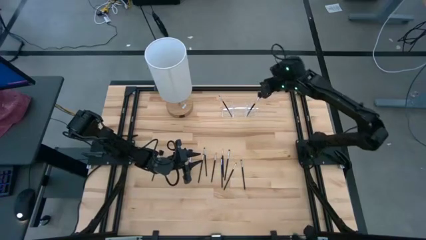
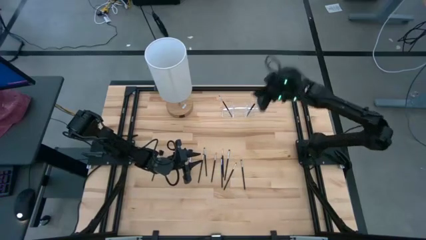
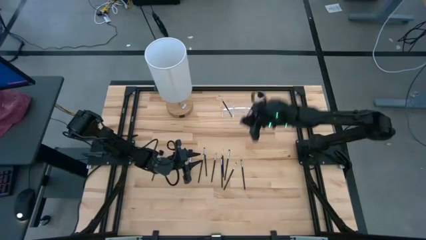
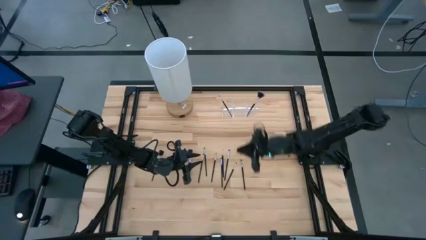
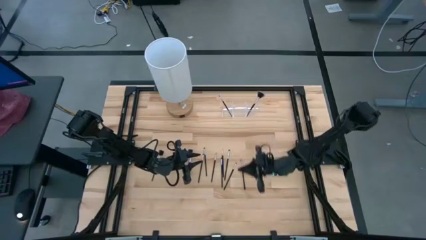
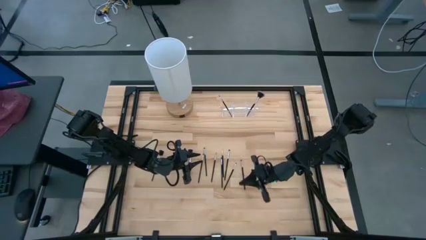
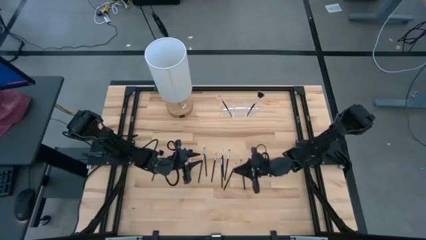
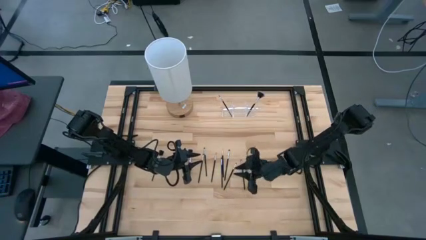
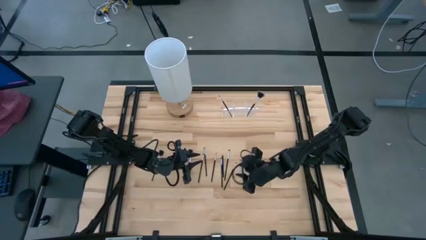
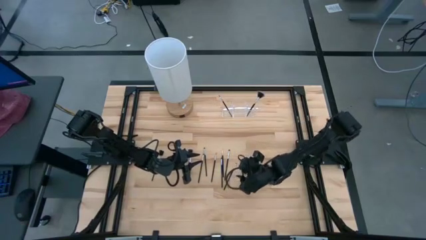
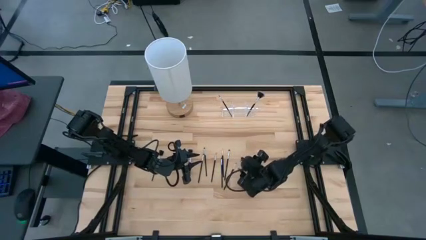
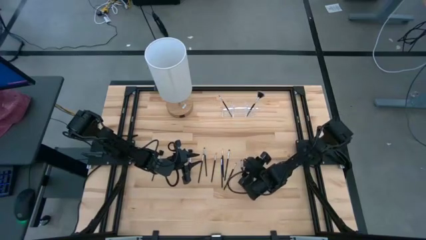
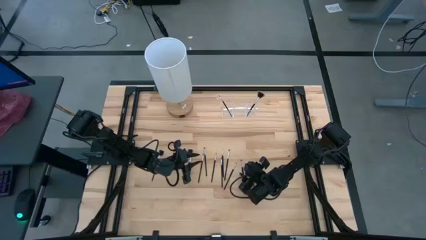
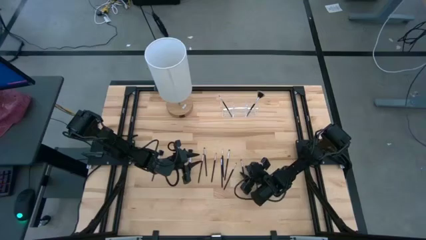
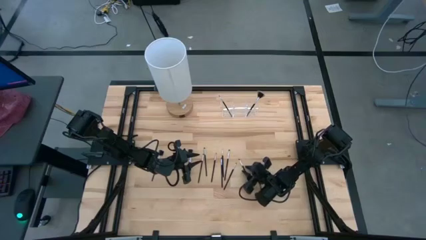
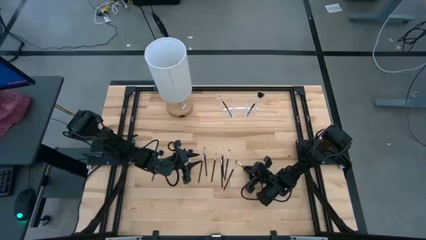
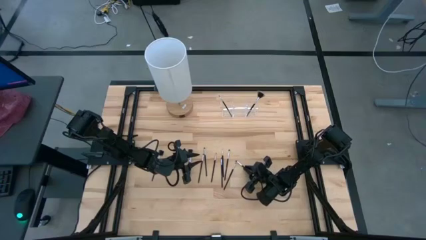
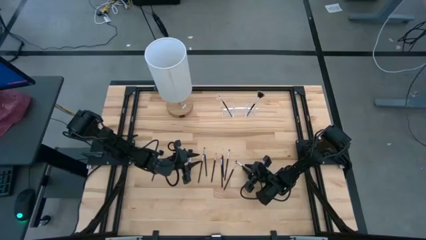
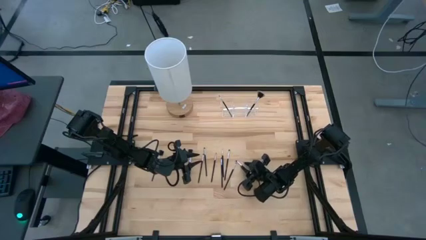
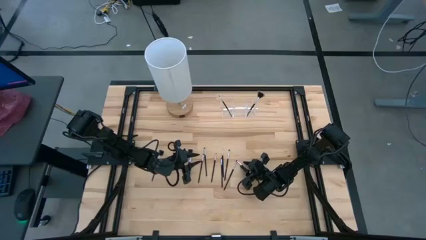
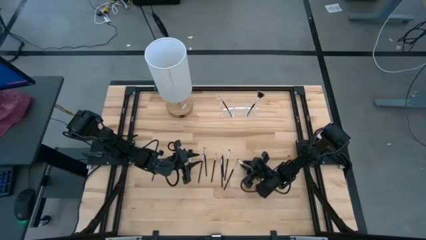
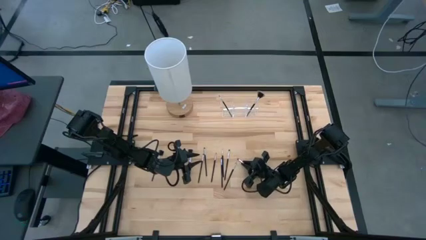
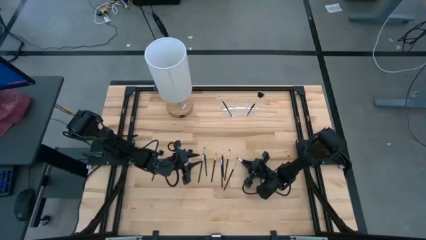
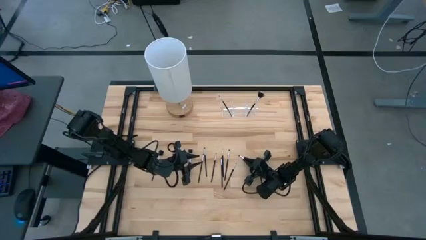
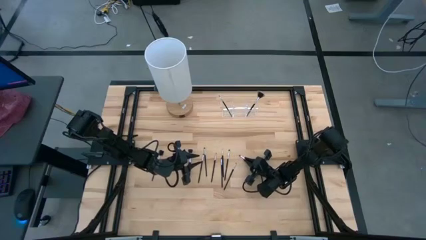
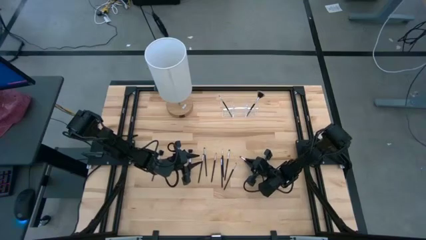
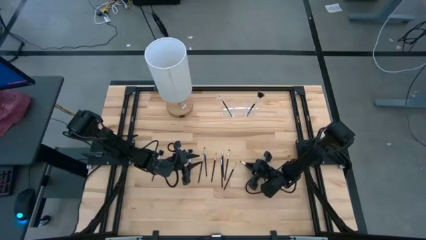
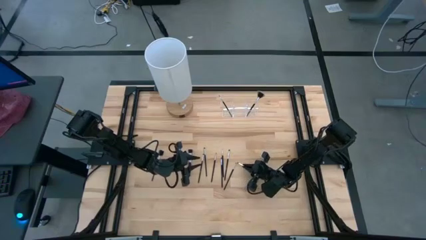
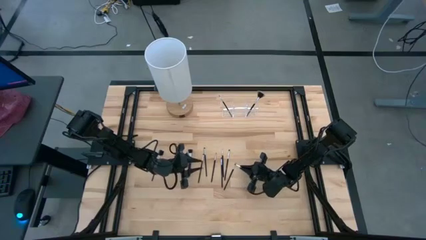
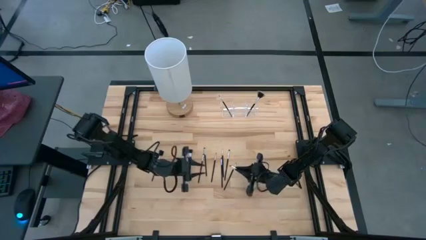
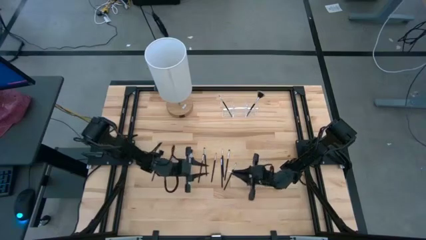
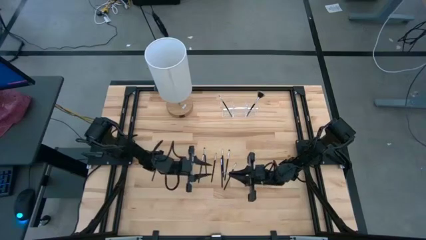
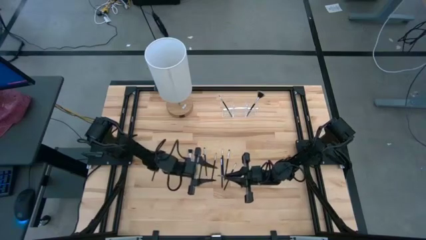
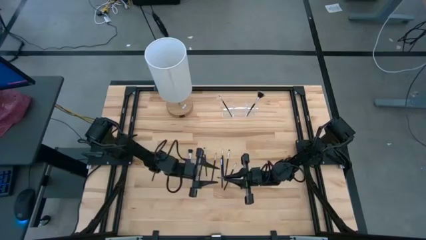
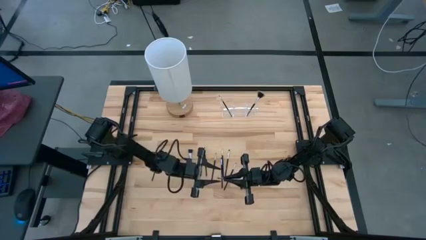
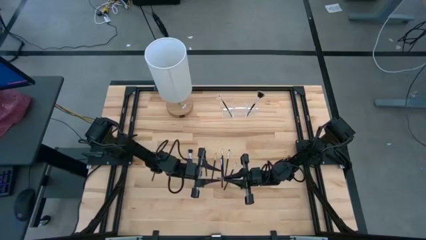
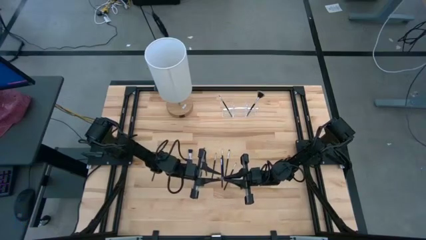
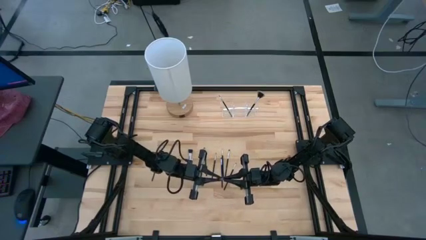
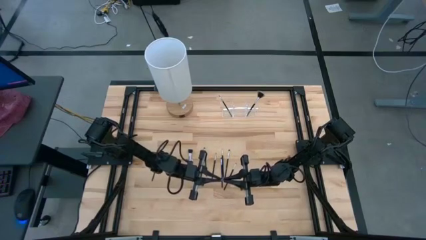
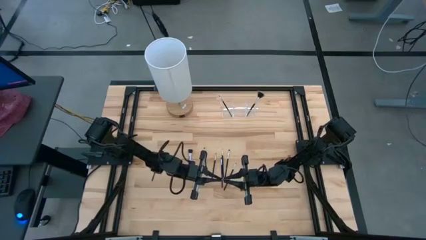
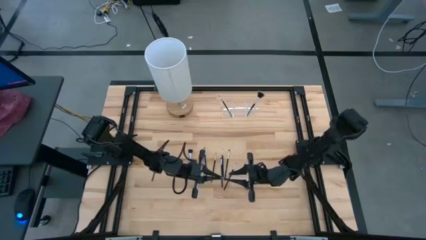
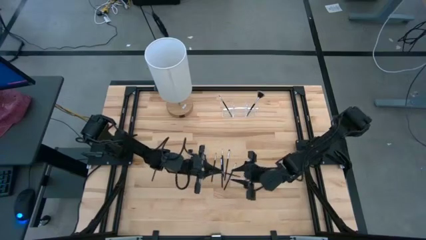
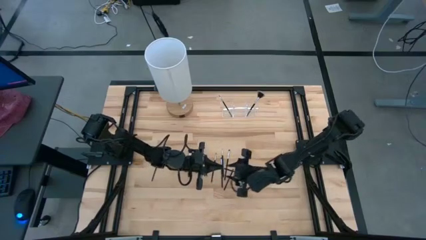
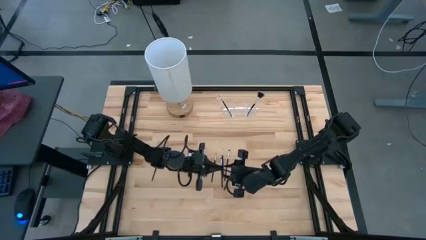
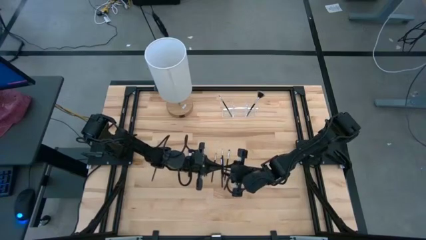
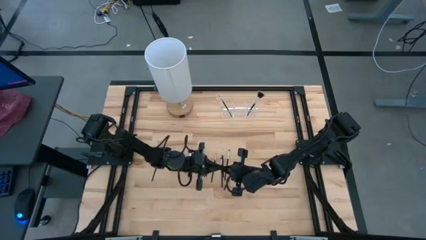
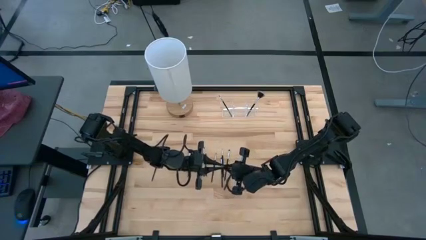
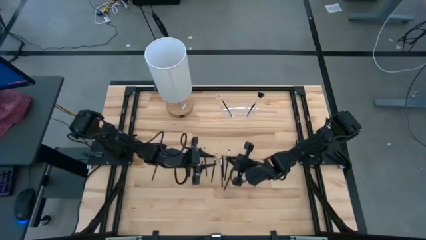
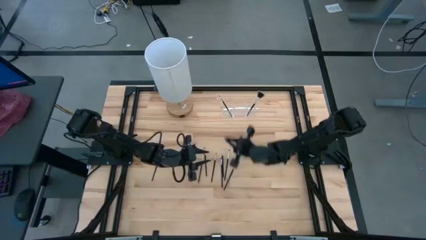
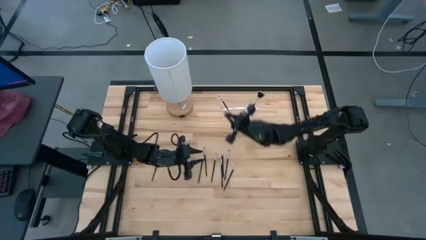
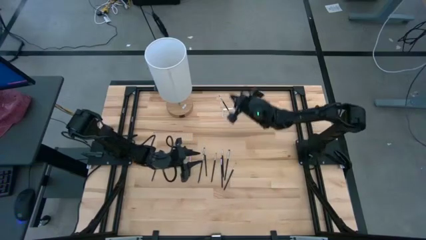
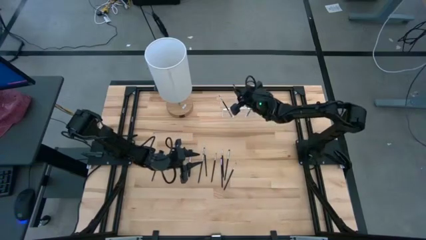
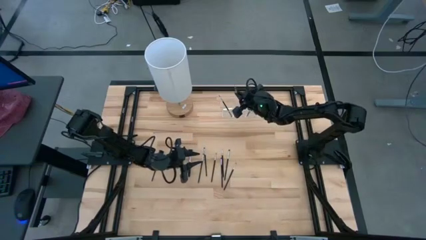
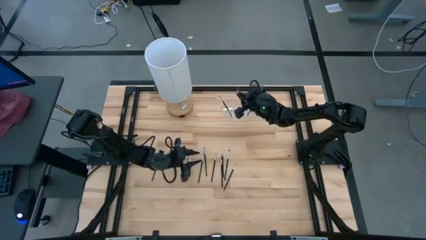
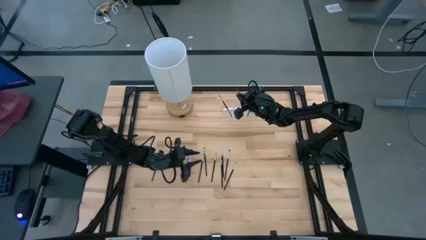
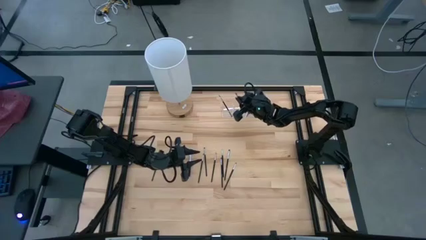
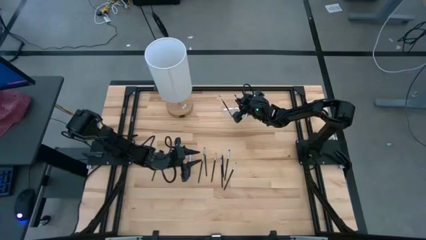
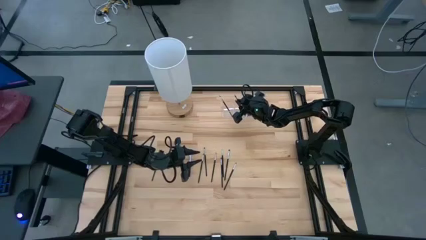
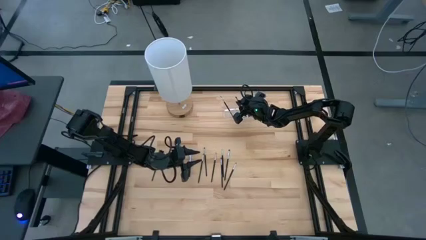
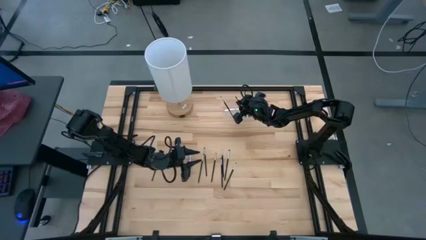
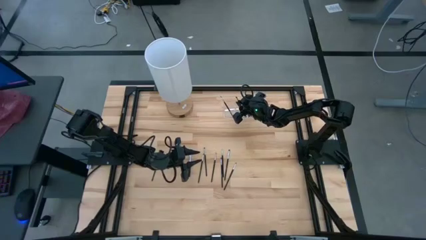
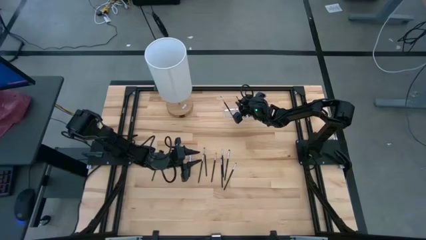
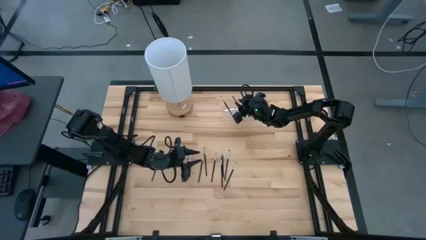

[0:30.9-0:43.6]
Task: Sort items
Put the eyeshadow brush into the transparent organizer

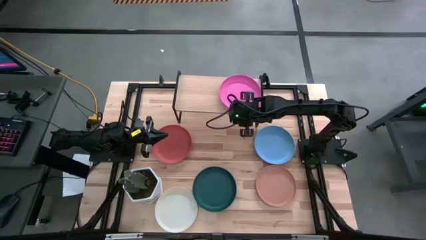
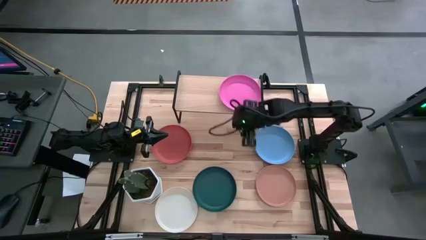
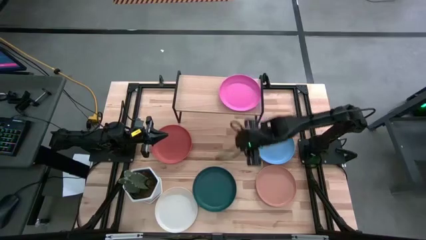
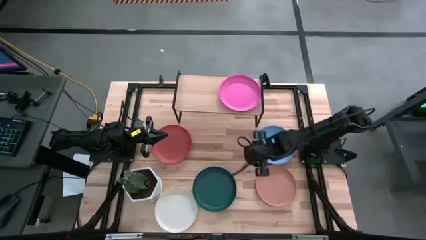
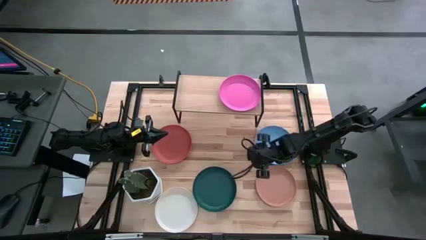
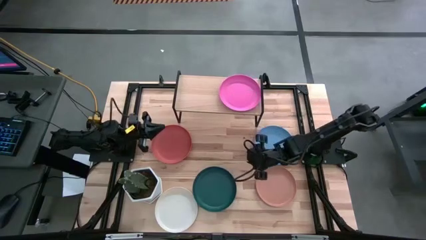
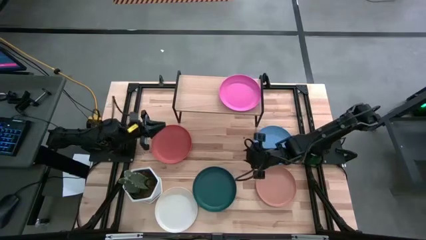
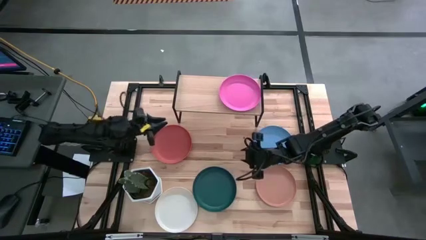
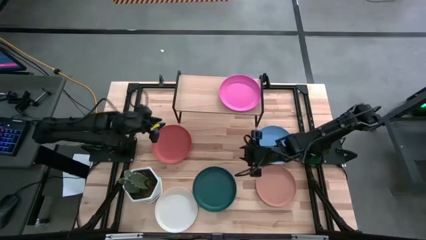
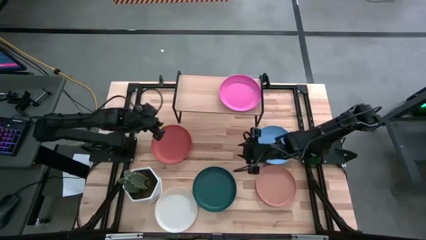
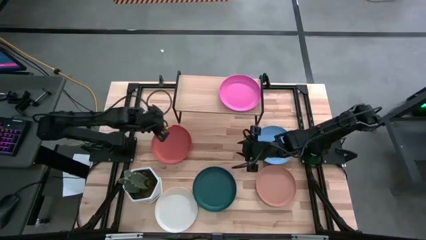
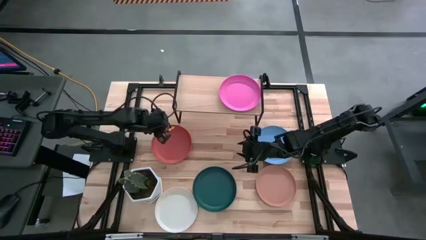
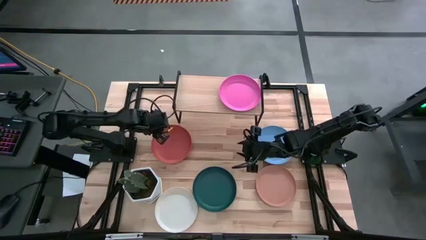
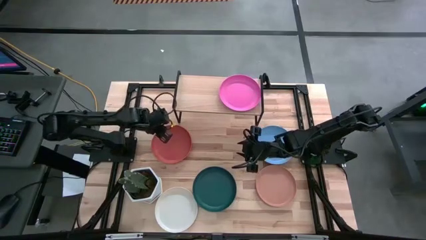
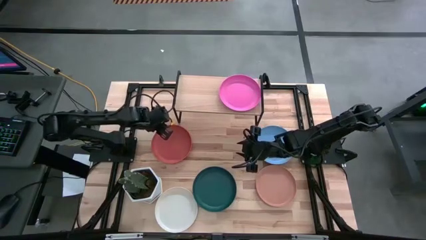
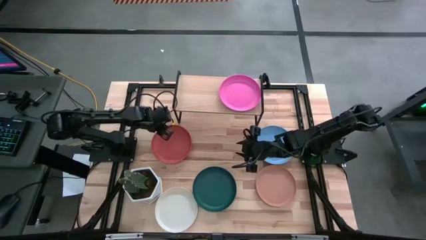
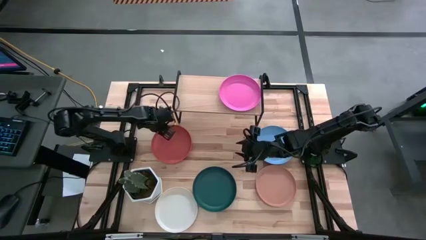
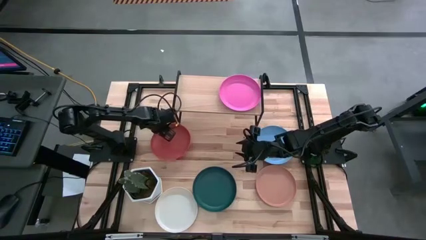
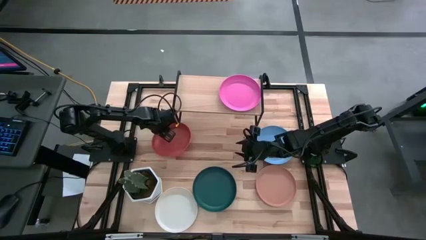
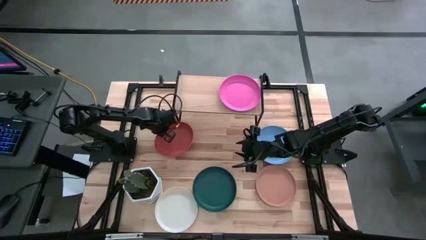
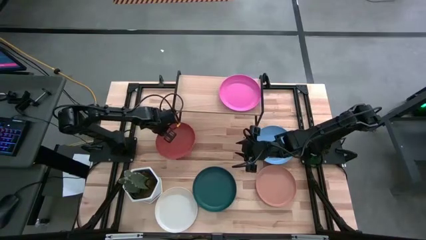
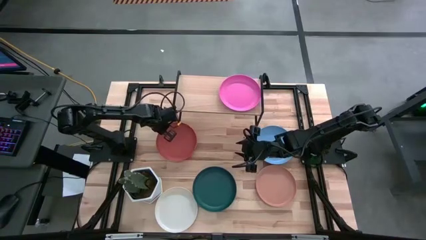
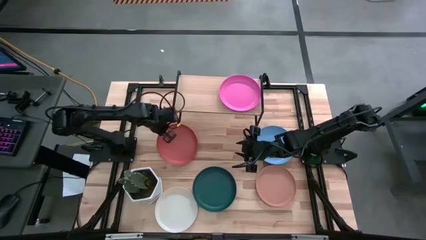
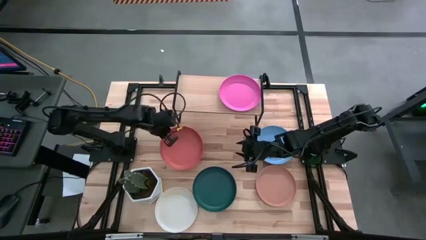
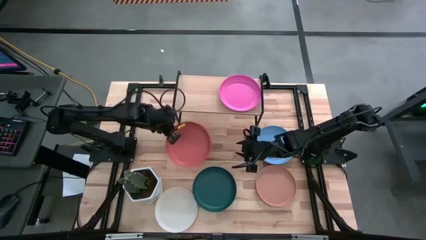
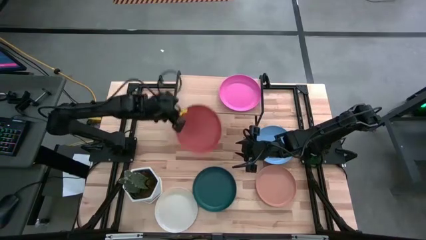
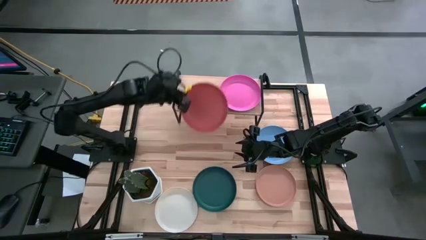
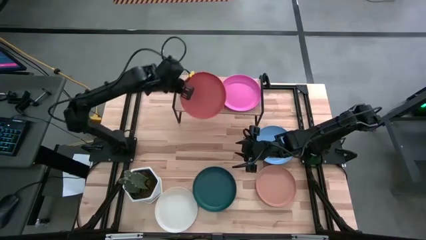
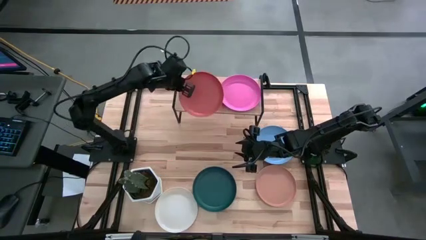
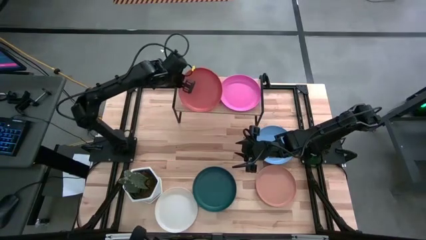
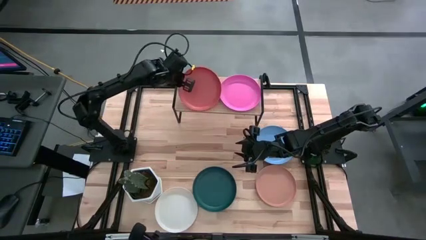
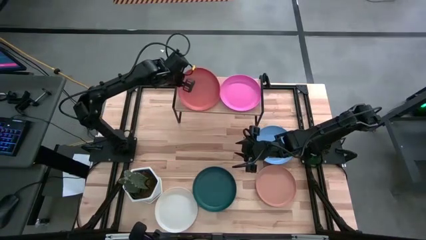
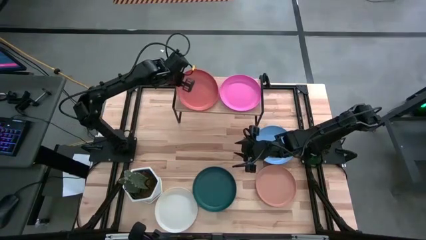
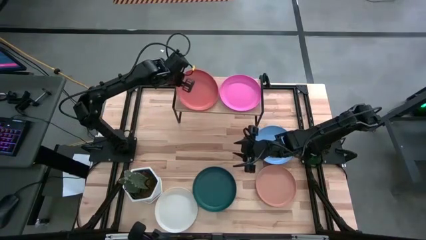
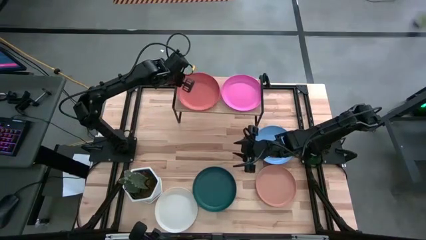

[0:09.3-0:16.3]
Task: Place and stack plates onto a shelf
Put the orange plate on the shelf
